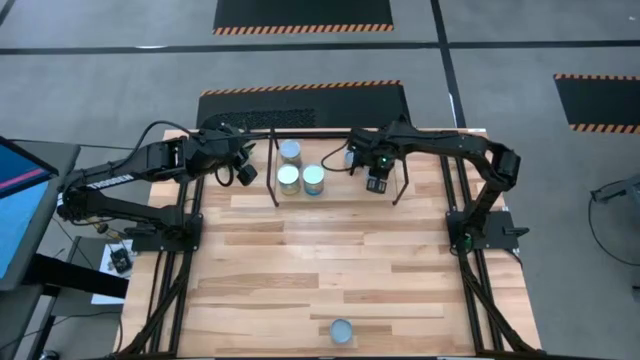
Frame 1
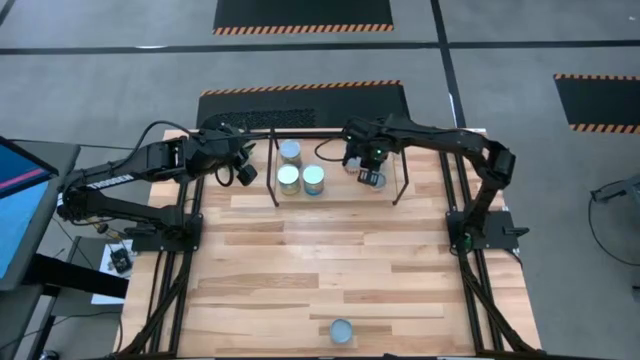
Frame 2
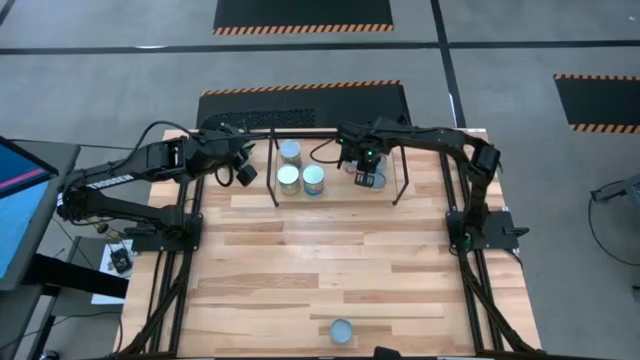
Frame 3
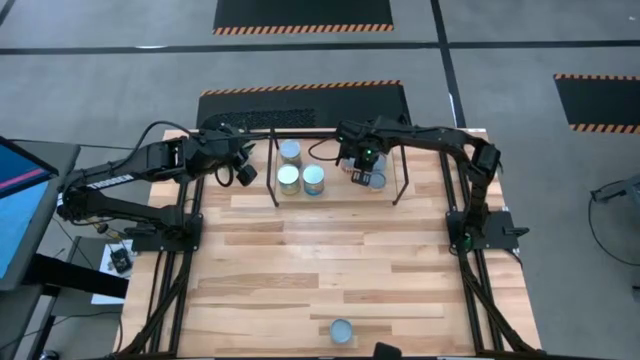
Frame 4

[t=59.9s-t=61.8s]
Task: Pick and place cans onto a shelf
Adjust the canned black beans on the shelf

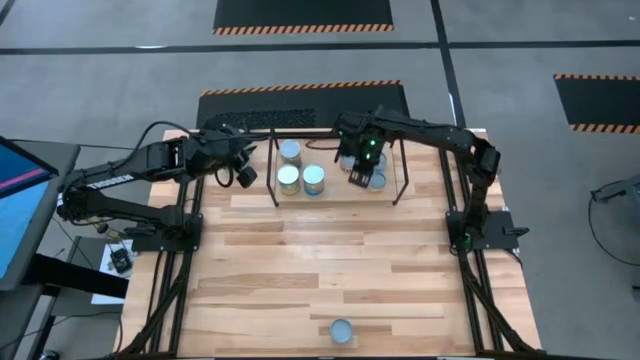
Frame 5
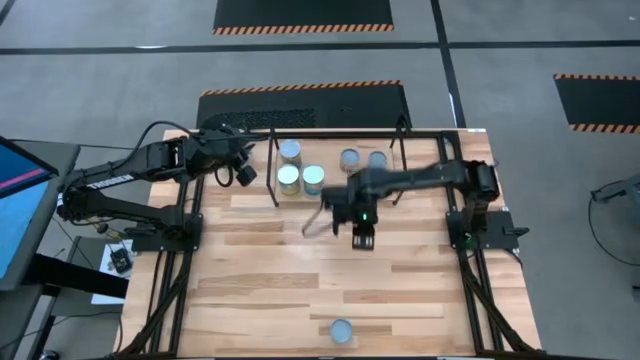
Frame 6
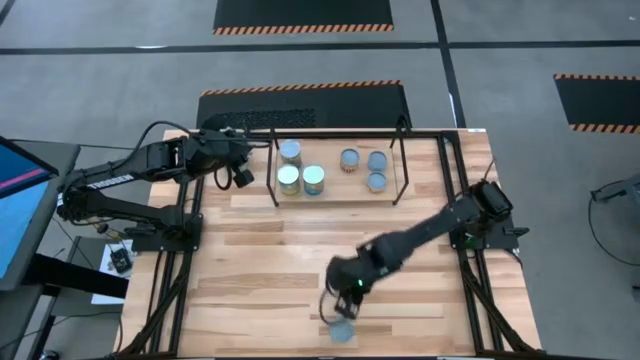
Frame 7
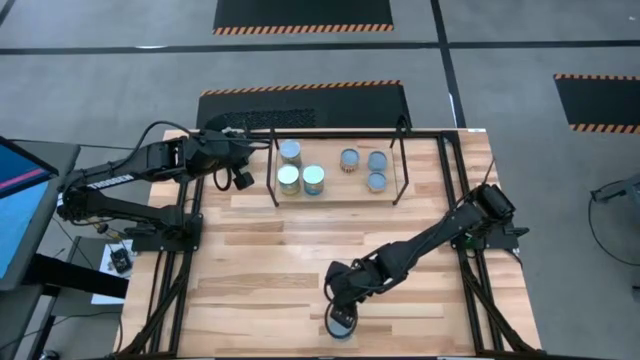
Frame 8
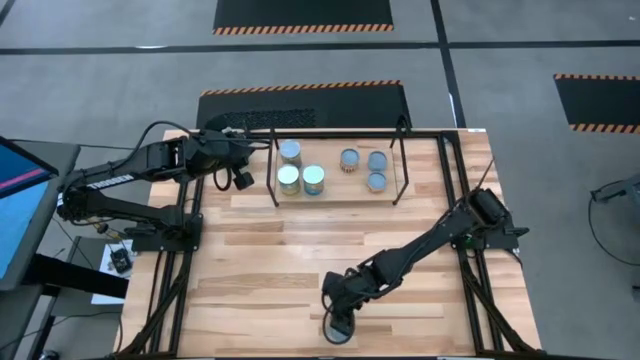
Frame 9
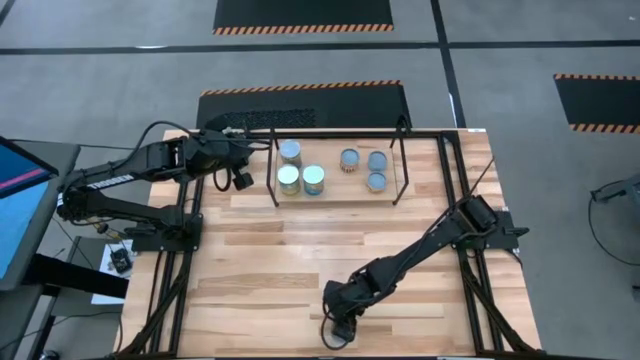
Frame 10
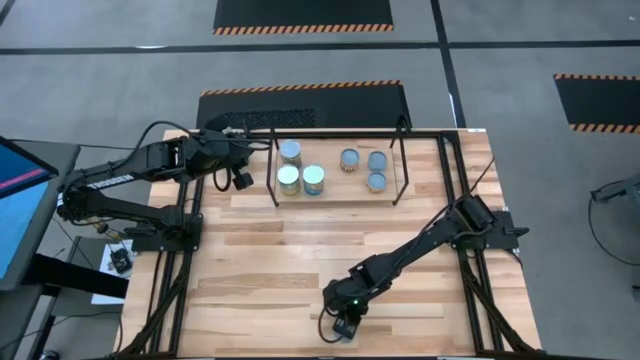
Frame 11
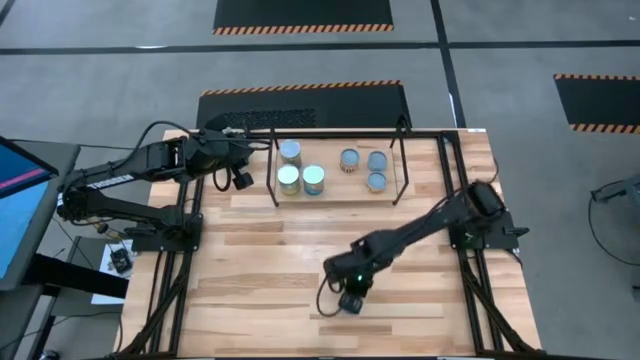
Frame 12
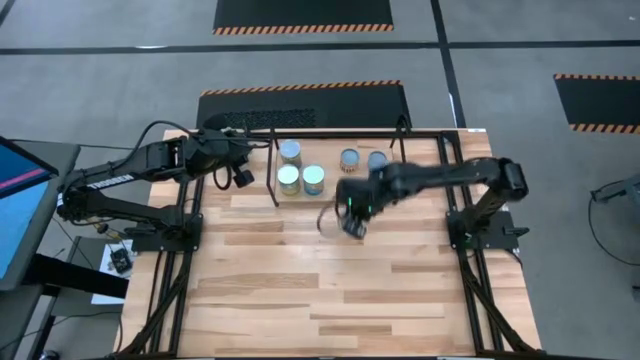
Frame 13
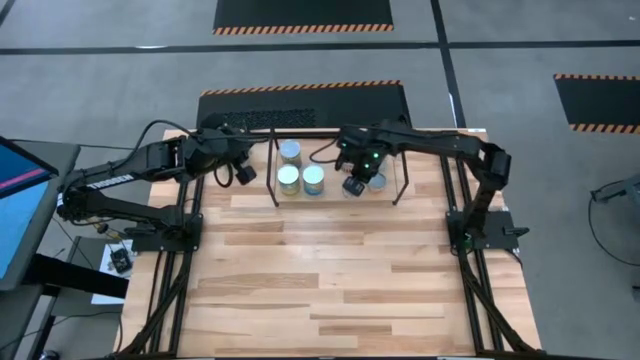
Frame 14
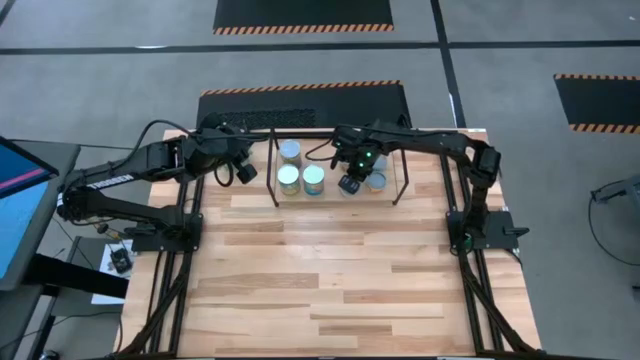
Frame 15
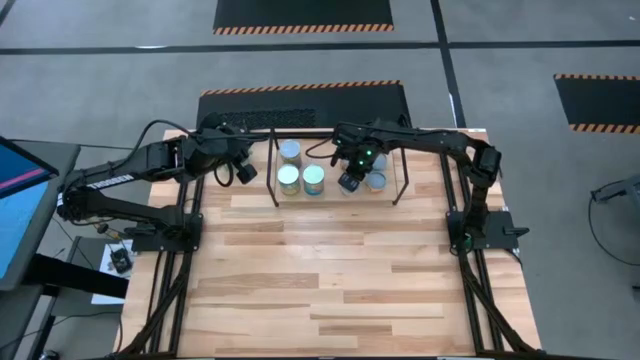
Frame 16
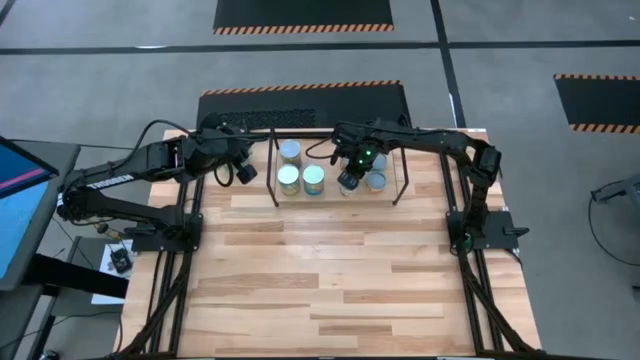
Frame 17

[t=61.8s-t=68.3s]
Put the canned green peas on the shelf

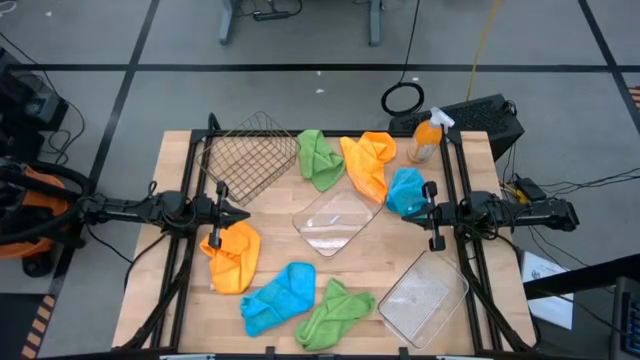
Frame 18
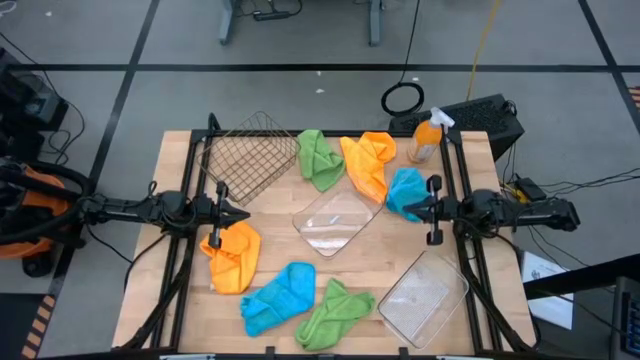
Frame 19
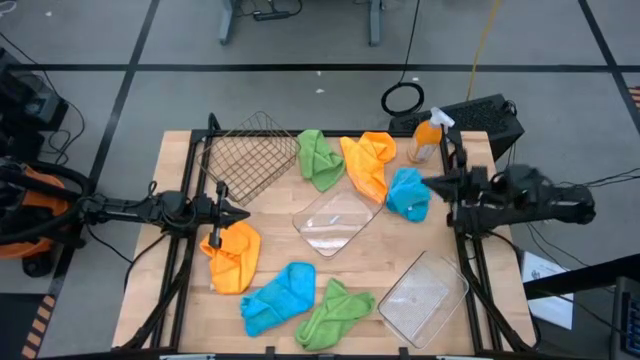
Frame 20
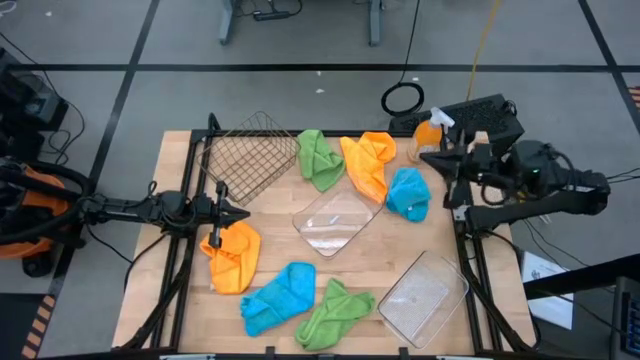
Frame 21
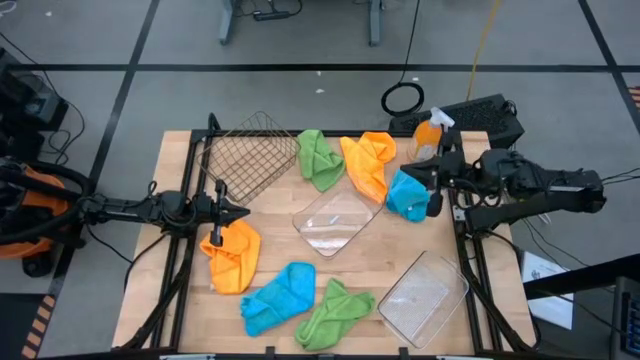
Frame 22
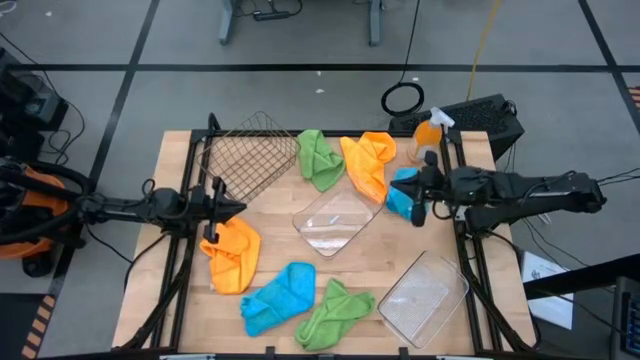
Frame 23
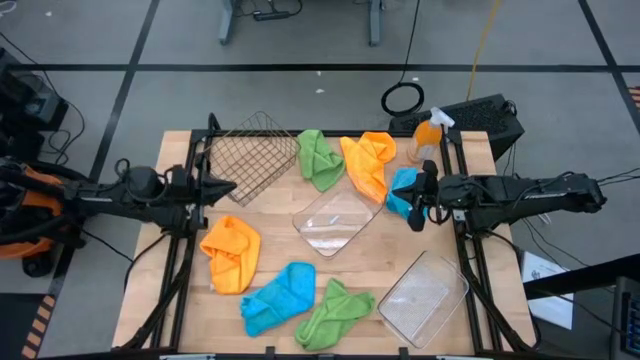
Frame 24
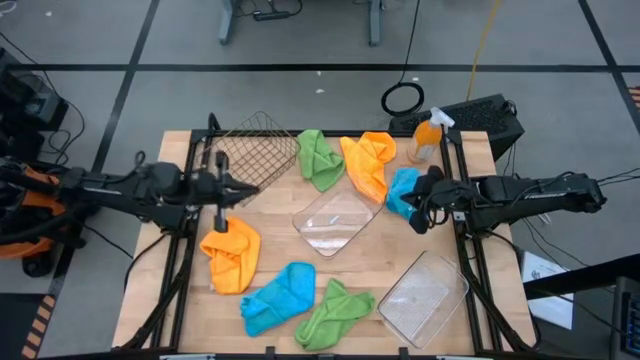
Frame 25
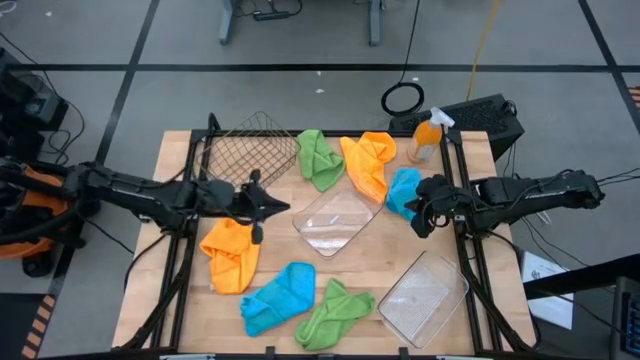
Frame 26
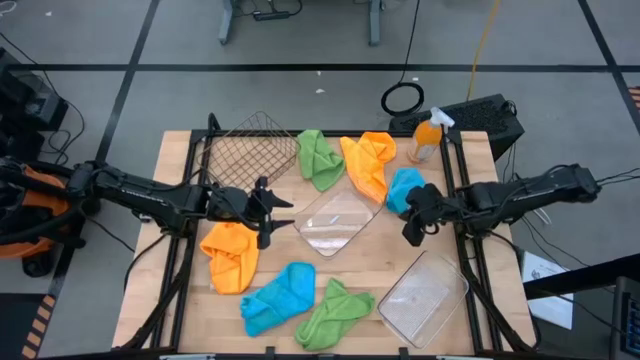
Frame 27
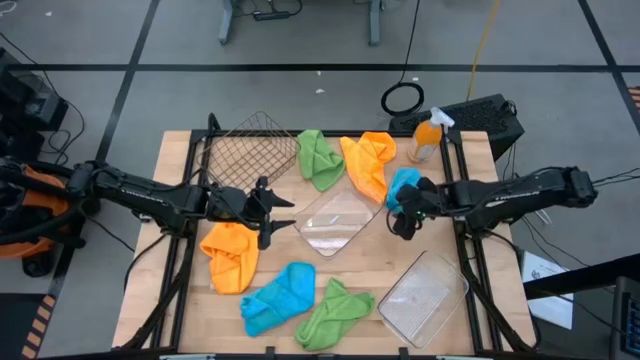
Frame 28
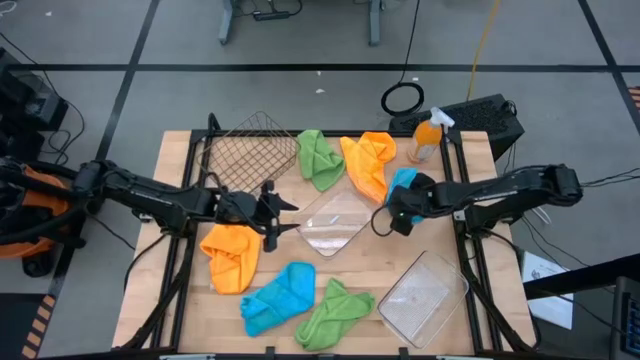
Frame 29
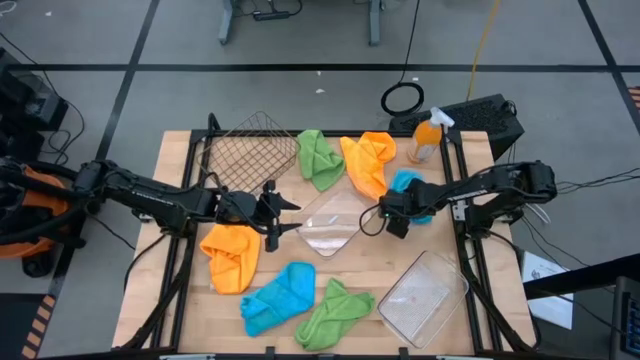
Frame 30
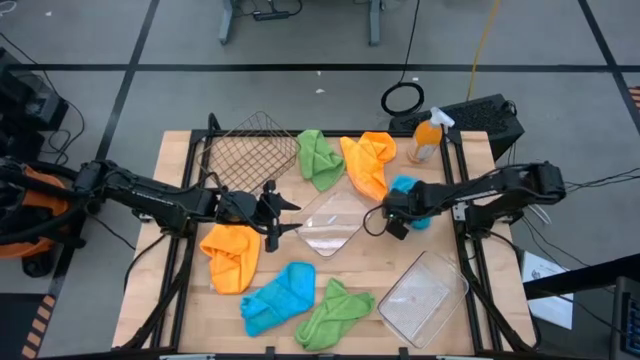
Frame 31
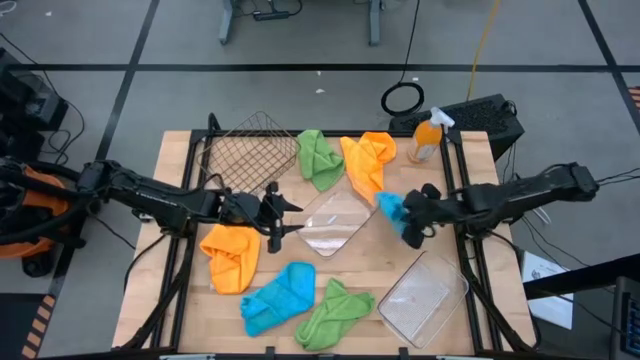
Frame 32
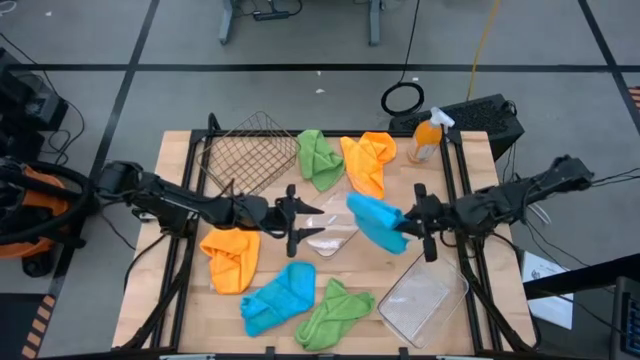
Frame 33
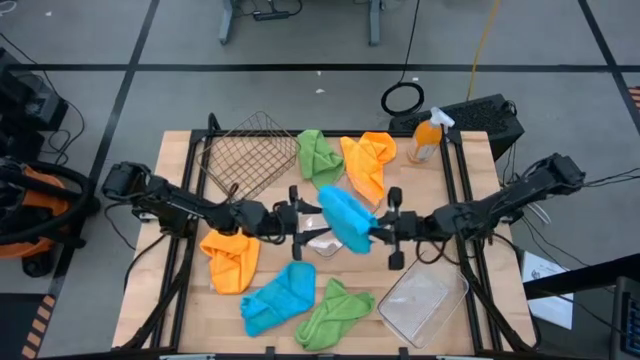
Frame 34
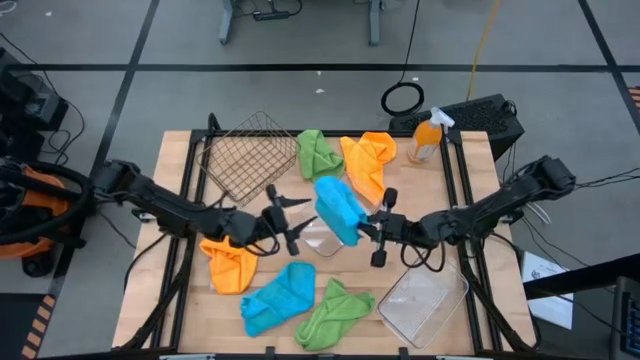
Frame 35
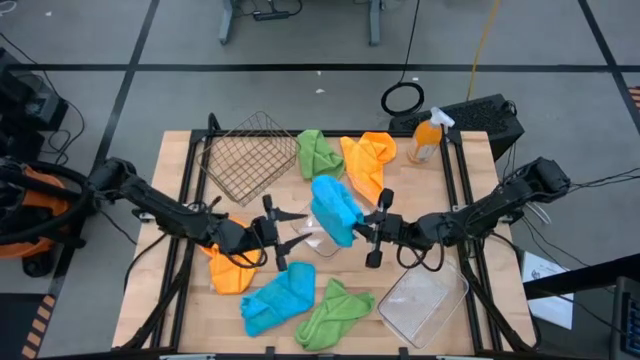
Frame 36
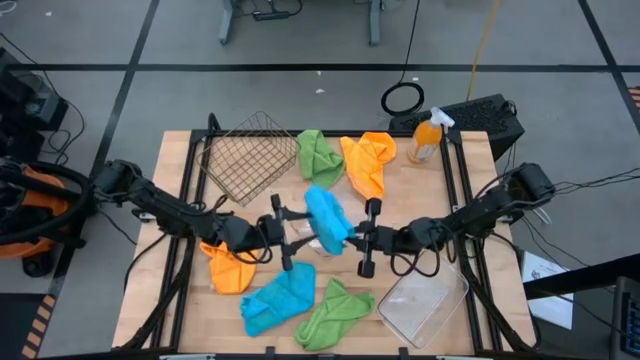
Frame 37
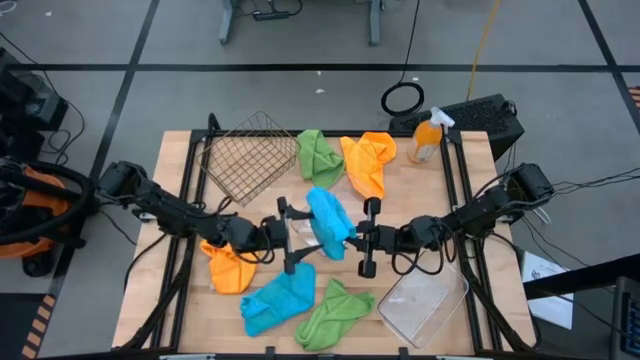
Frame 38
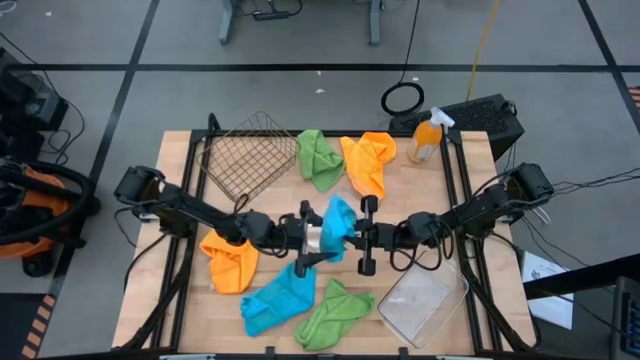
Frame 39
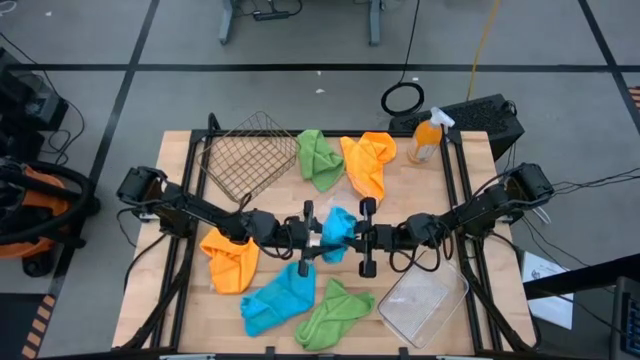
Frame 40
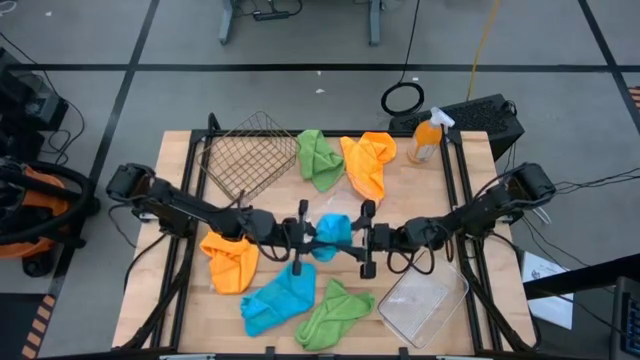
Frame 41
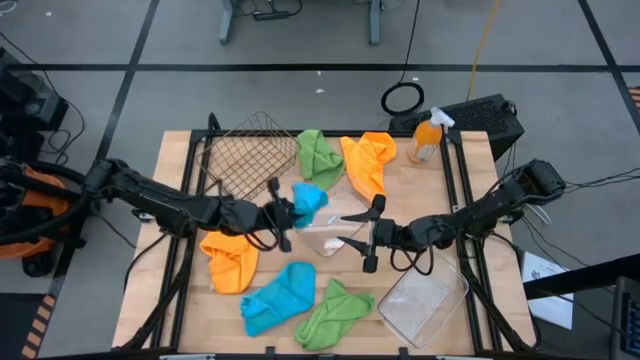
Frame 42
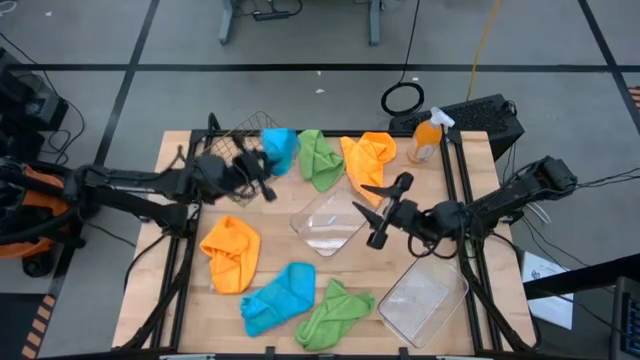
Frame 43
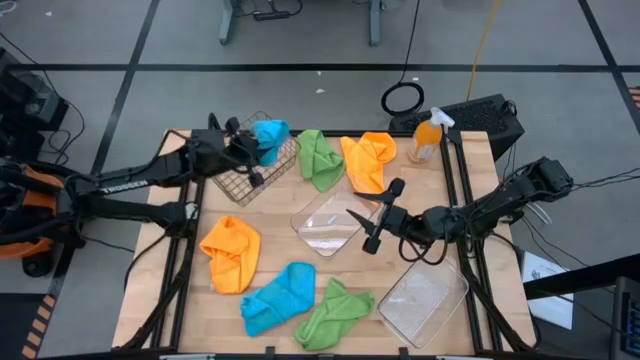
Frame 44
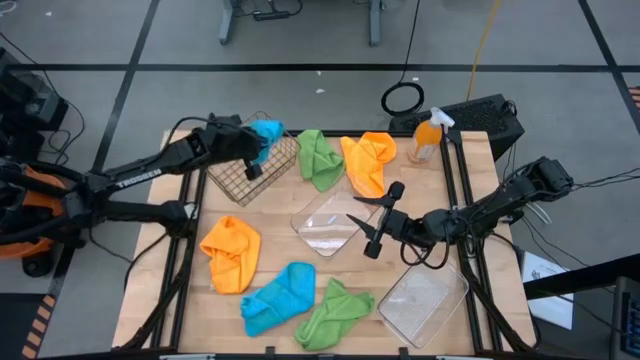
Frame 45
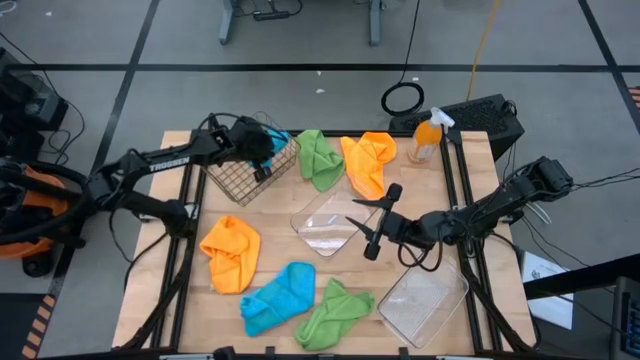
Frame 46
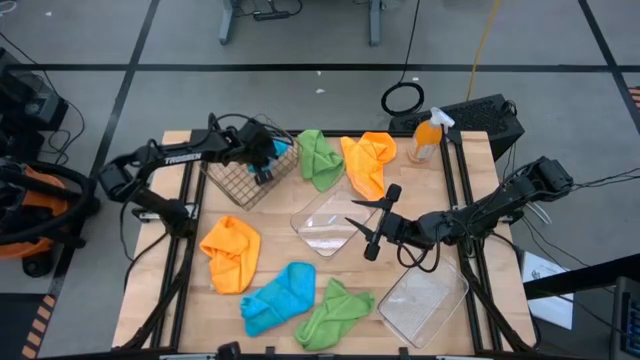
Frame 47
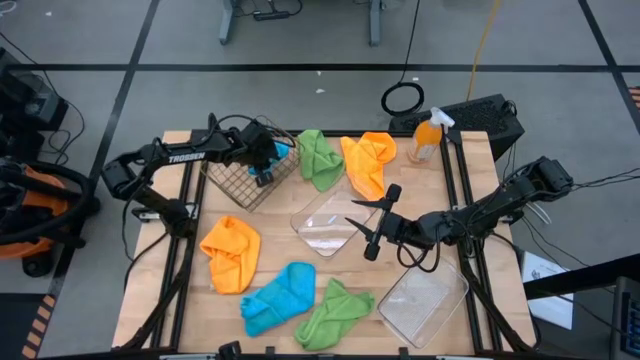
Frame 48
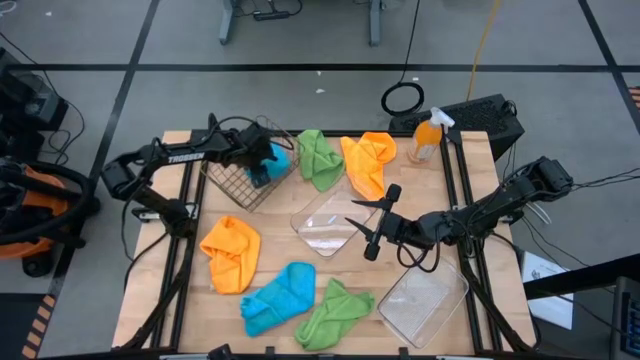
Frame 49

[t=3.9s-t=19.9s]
Task: Sort microfiber towel by color & place in baskets
Put the top blue towel into the gold wire basket
